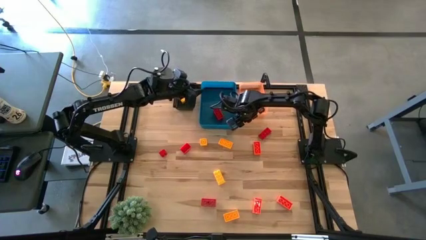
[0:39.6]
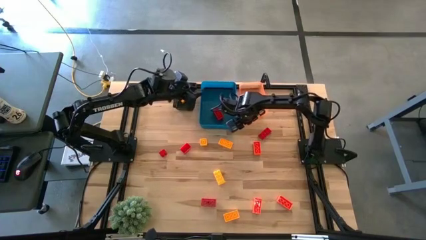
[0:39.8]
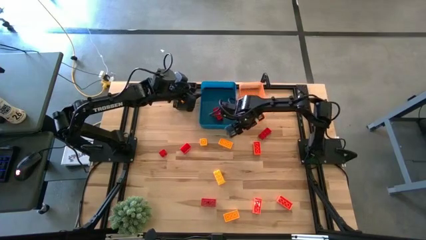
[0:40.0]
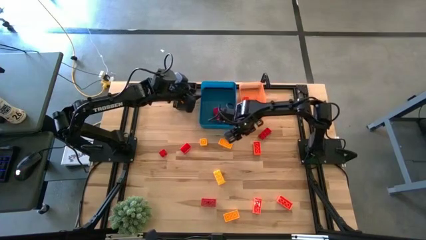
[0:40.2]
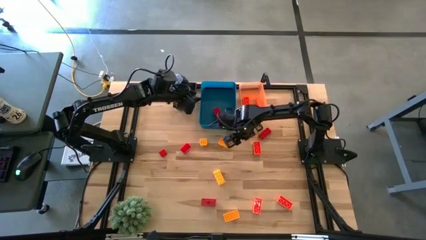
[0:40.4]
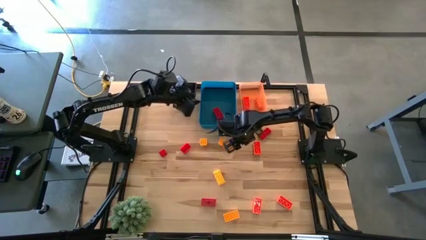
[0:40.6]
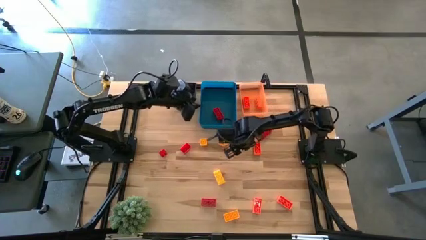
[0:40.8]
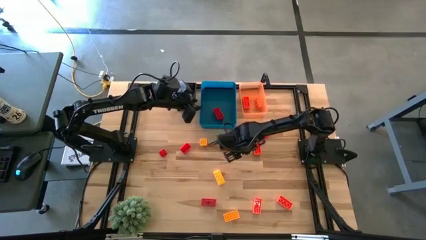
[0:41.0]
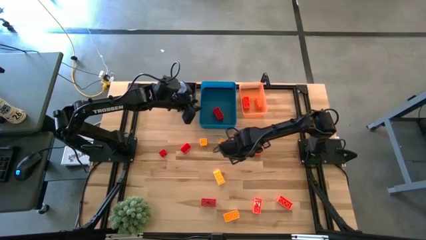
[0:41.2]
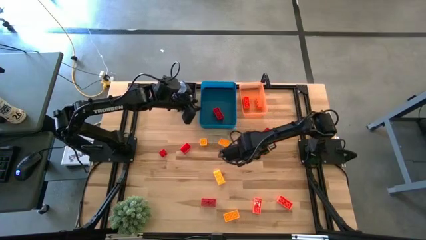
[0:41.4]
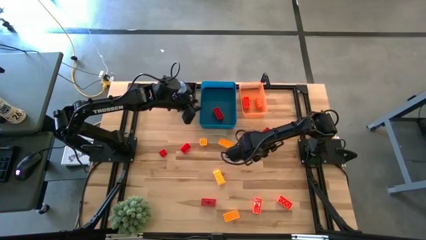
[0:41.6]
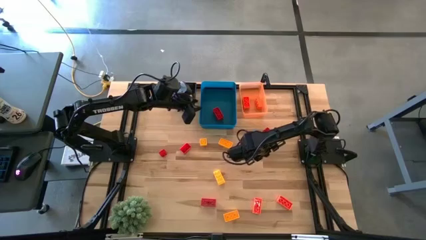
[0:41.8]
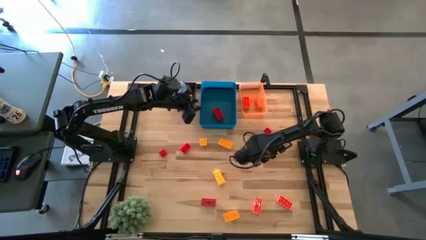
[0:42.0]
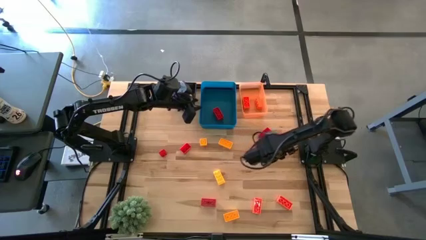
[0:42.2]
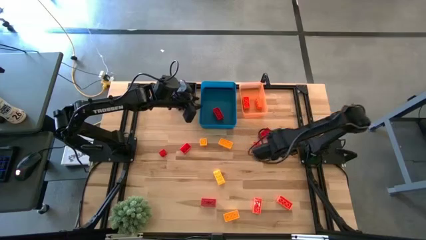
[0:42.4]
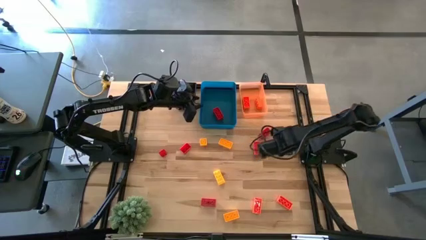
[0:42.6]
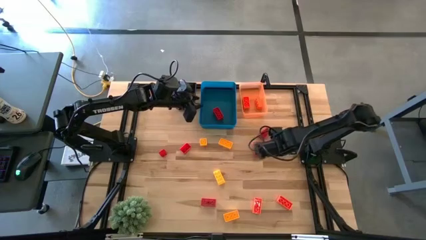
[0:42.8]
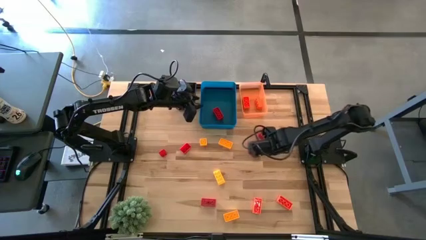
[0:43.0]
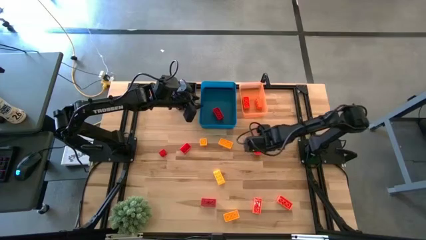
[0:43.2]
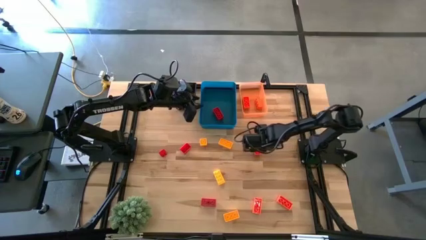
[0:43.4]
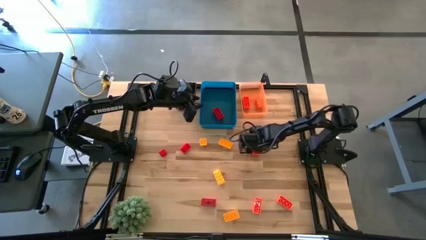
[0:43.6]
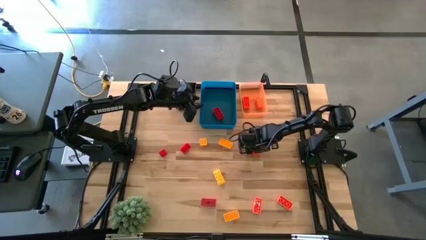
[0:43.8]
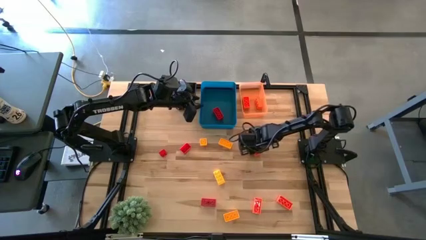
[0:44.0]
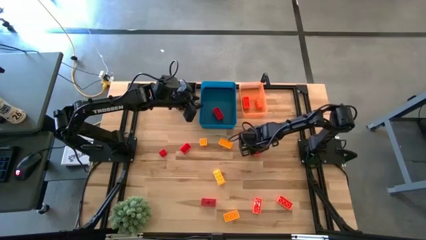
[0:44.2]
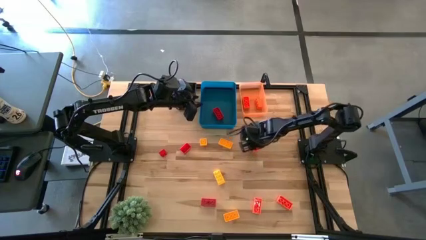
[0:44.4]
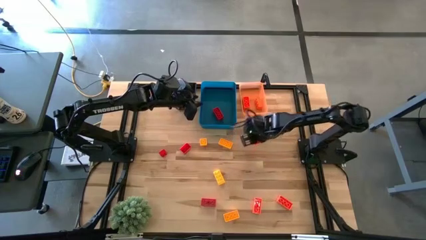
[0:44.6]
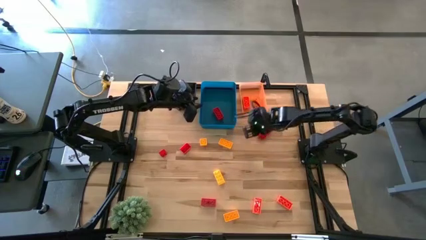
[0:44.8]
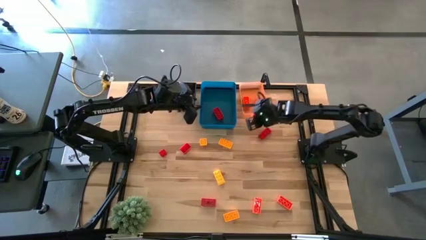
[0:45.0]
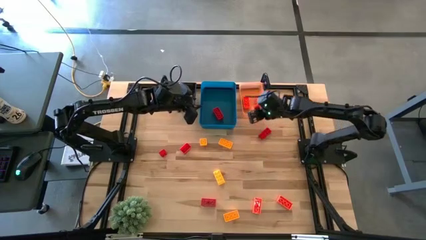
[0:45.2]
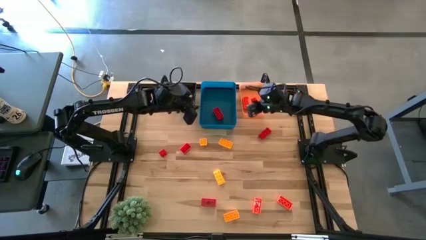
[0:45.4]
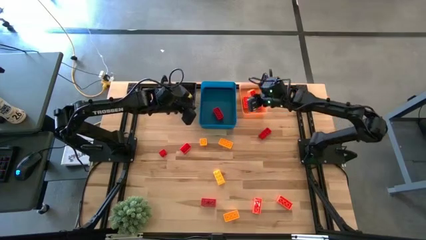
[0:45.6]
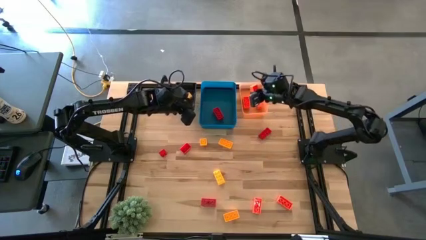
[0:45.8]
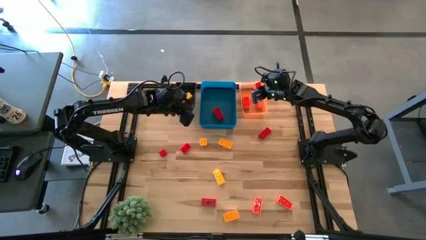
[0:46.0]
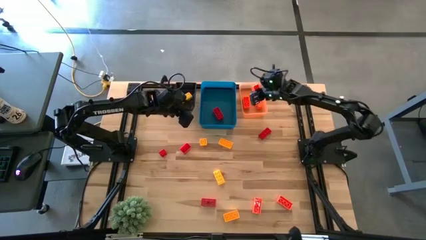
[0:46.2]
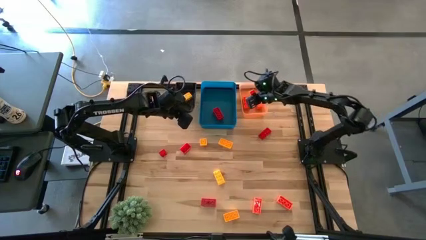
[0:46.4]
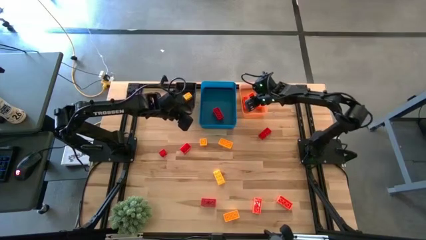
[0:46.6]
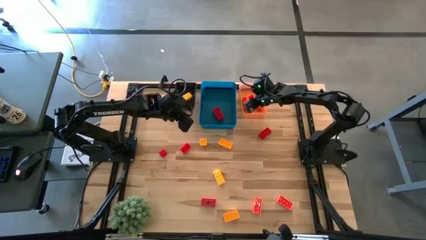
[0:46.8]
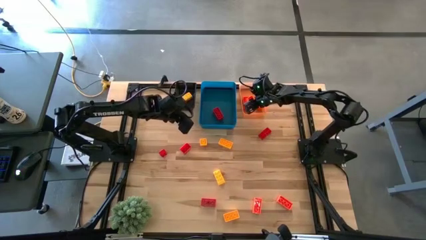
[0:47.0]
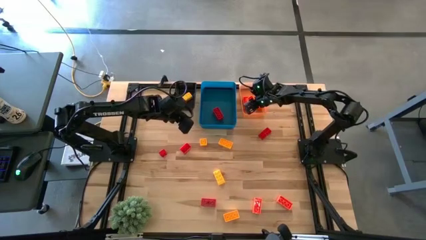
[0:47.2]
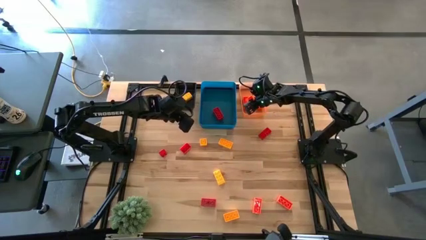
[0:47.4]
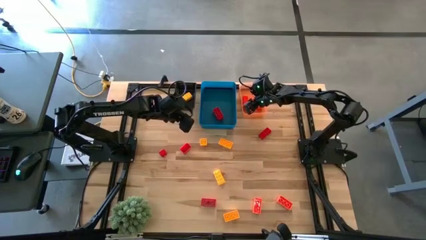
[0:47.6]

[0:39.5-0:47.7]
Task: Sort & place blocks by color
Put the orange game piece into the orange bin

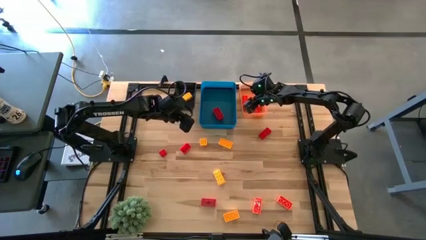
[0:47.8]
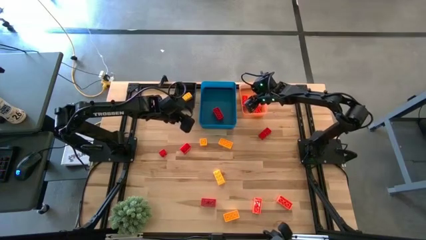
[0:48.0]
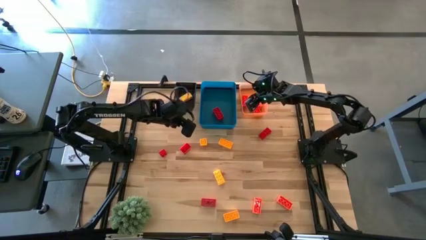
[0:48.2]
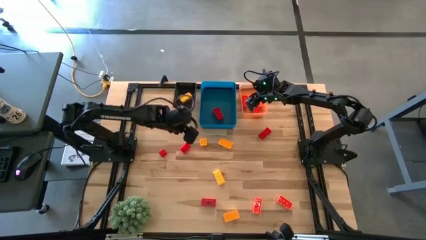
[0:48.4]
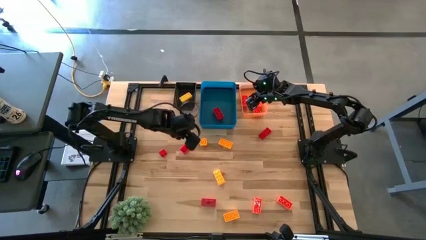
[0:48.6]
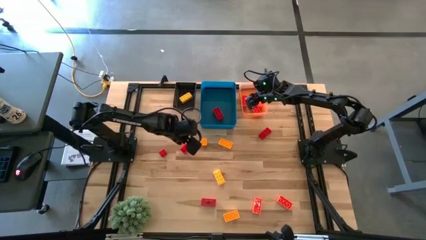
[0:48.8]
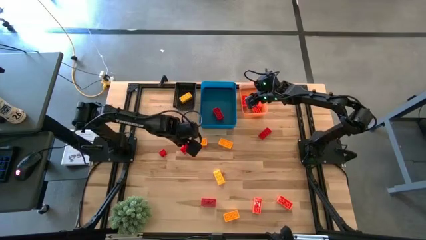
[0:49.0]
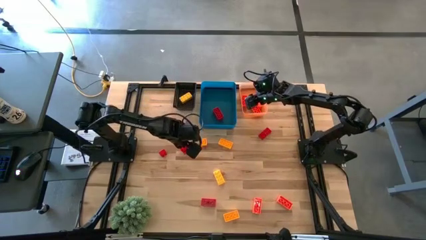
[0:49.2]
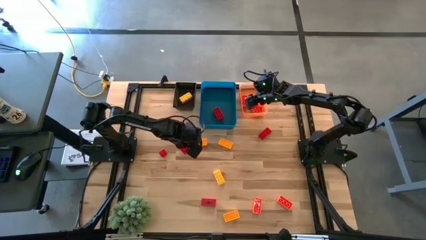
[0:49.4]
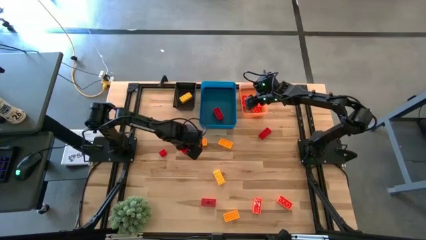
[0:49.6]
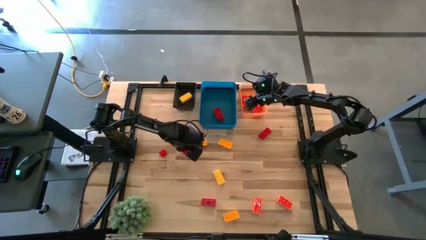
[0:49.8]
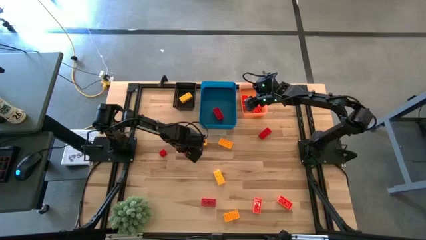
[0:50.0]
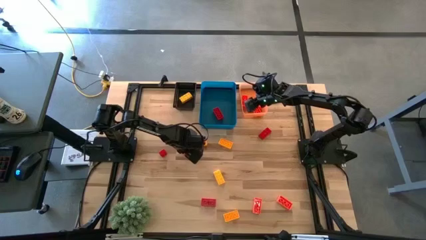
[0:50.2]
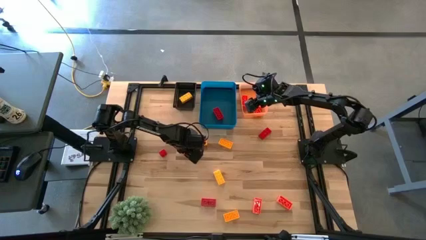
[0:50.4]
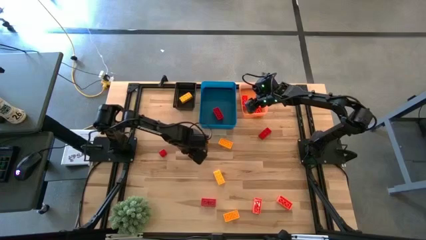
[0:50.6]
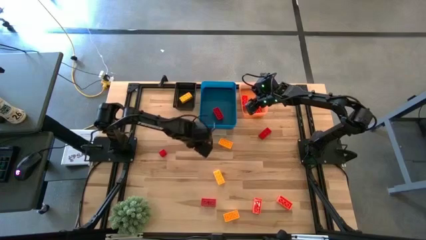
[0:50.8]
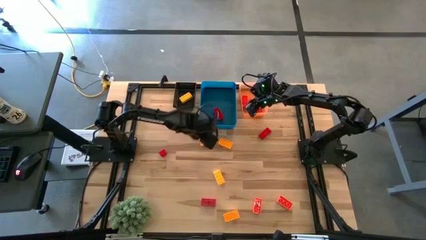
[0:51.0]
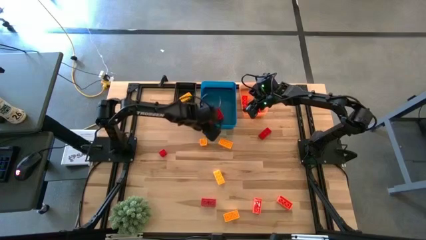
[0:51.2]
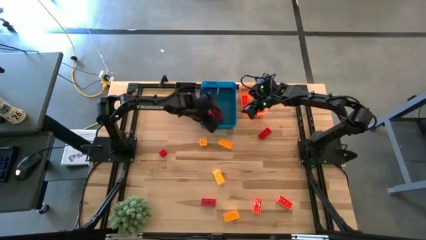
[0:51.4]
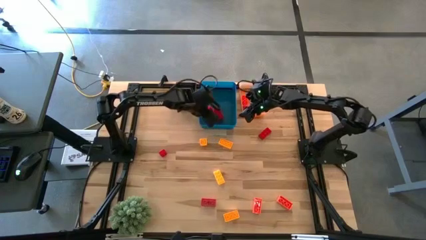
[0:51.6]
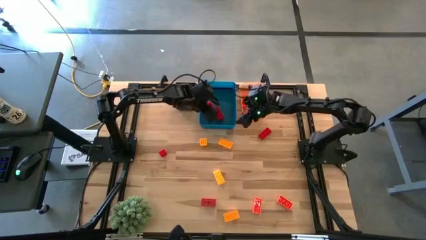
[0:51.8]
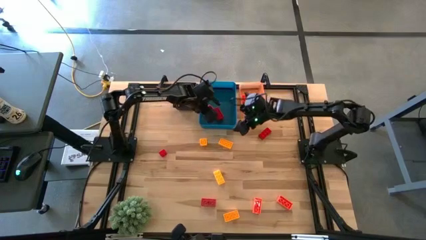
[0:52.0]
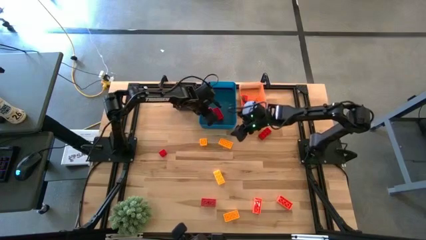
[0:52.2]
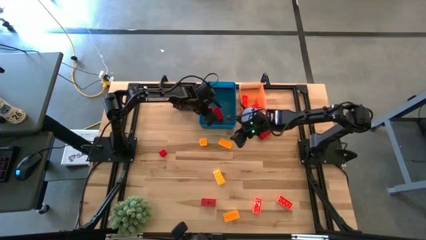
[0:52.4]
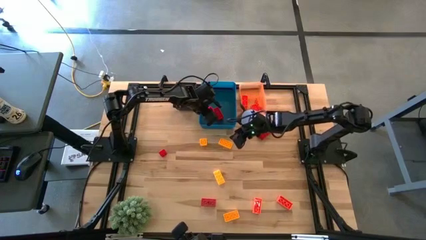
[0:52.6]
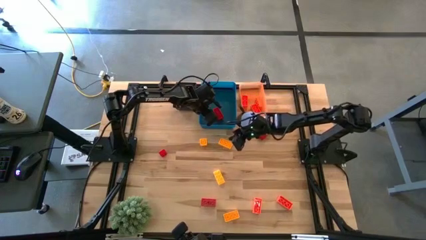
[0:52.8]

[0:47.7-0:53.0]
Put the red game piece into the blue bin
